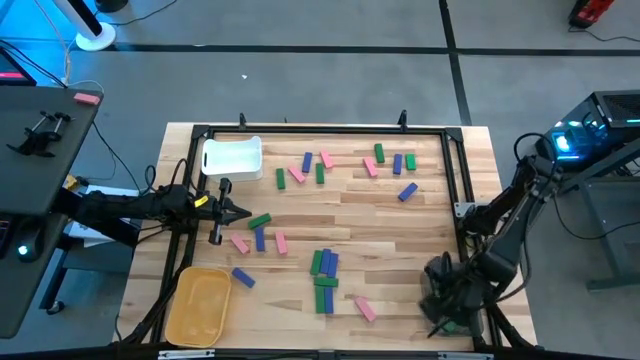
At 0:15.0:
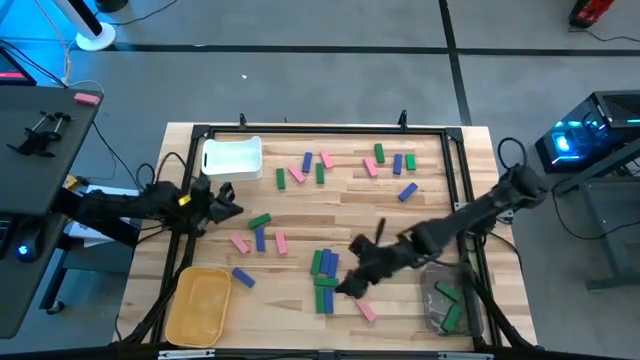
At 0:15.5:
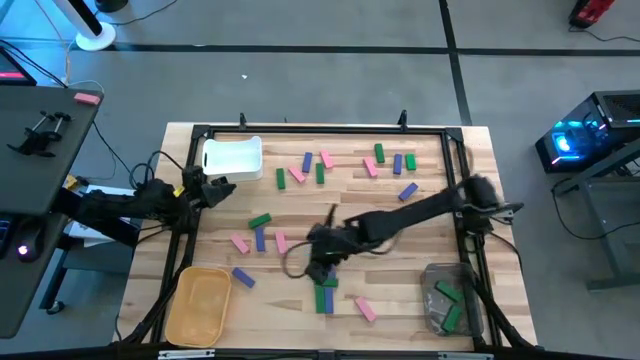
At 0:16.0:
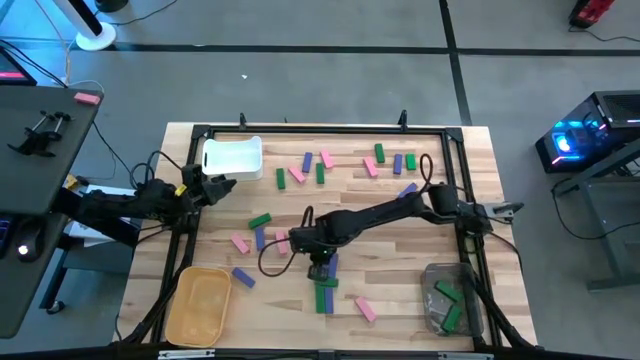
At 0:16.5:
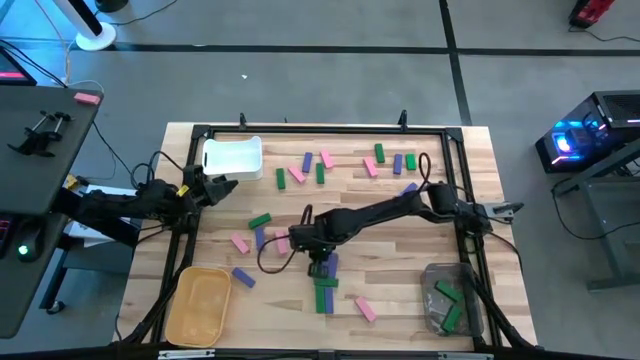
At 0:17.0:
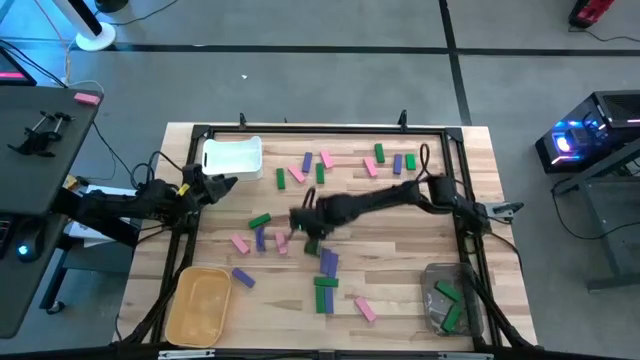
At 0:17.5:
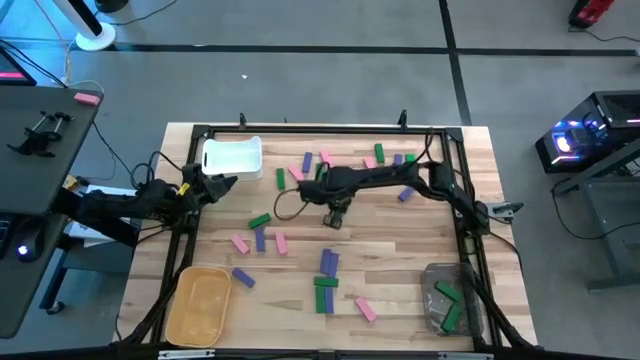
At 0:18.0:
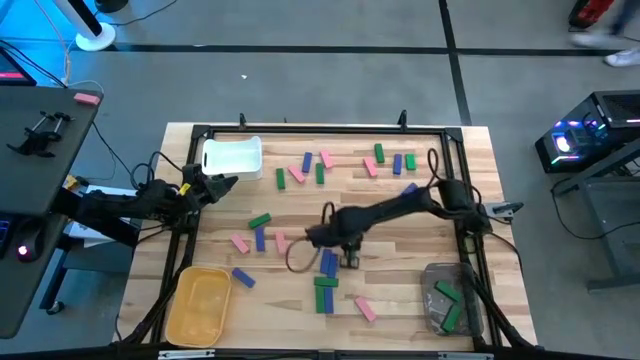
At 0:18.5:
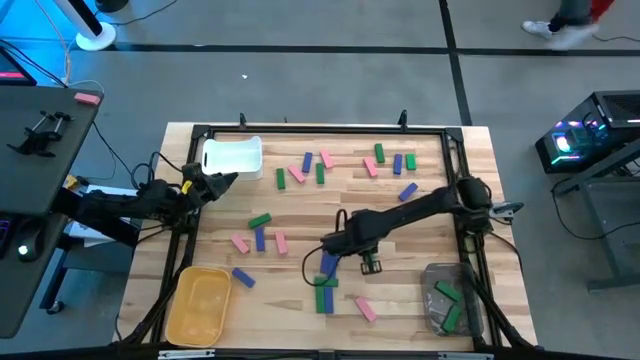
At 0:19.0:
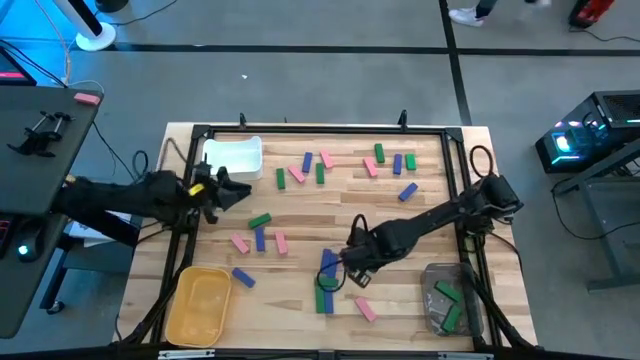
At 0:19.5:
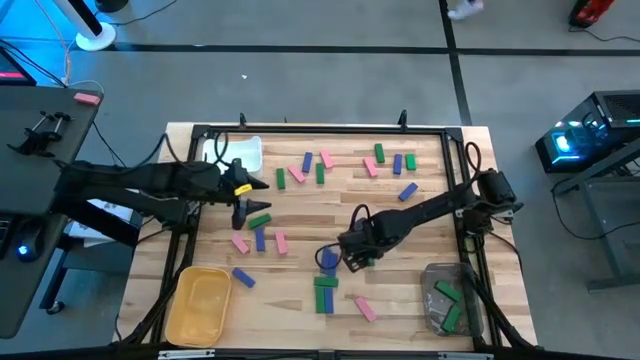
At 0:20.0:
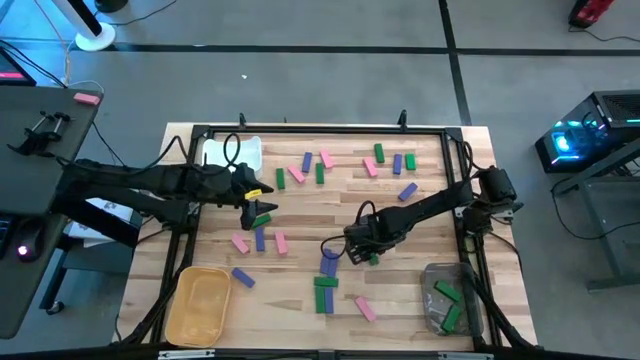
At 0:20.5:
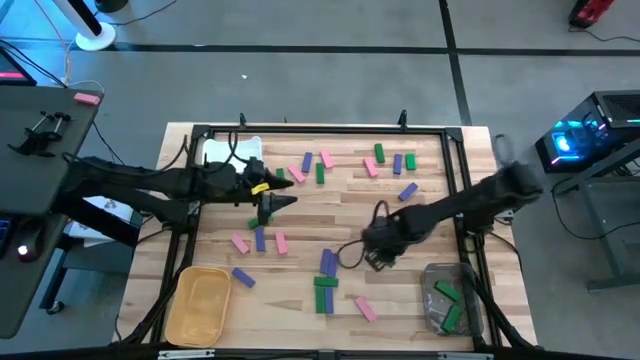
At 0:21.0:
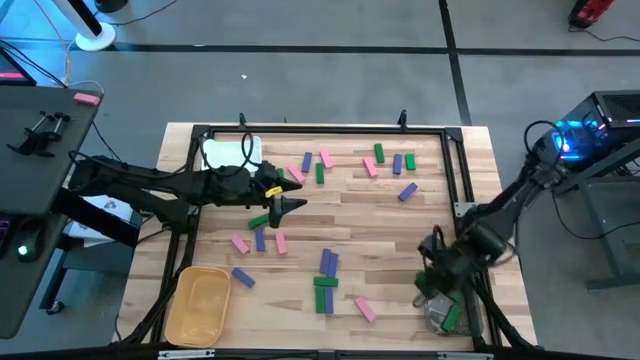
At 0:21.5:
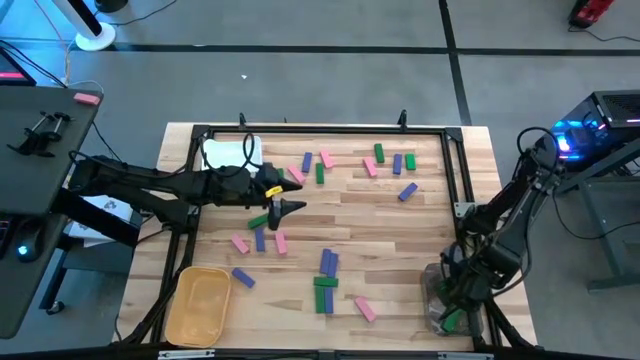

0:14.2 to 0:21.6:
Task: Sort blocks
Put the green block into the black transparent bin

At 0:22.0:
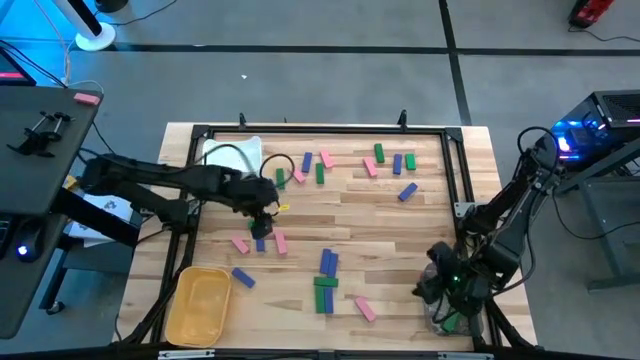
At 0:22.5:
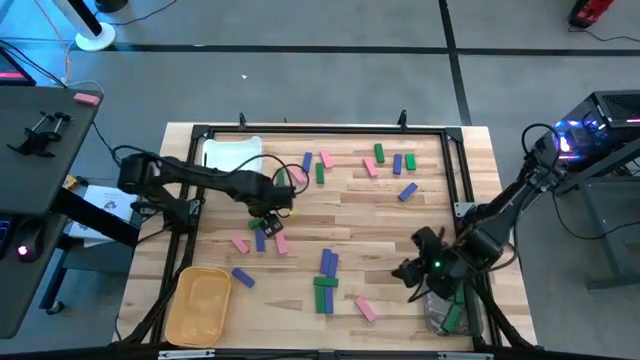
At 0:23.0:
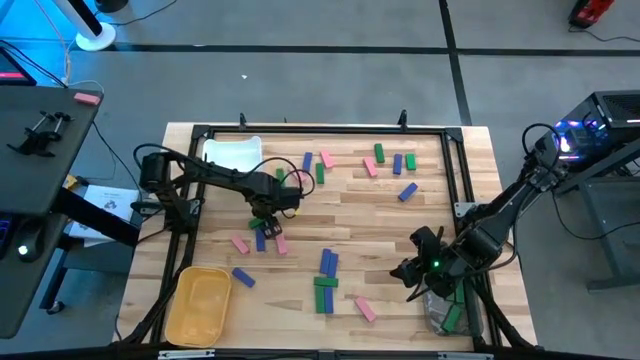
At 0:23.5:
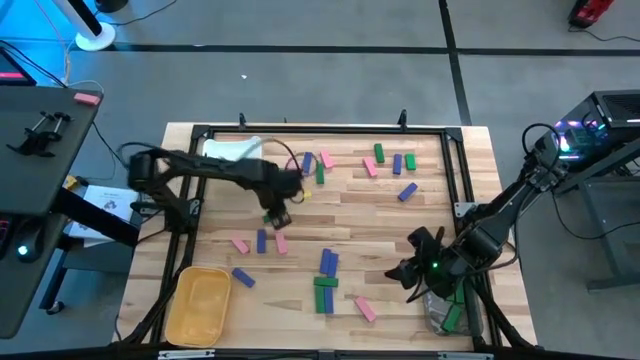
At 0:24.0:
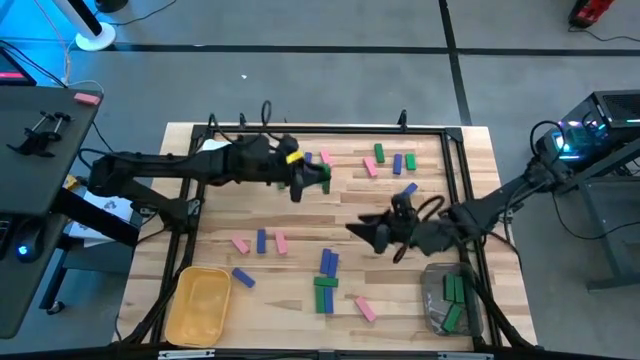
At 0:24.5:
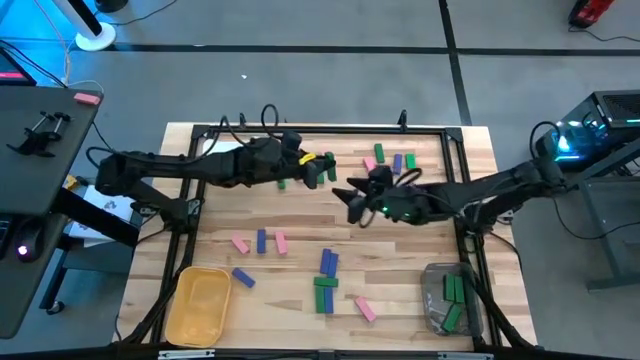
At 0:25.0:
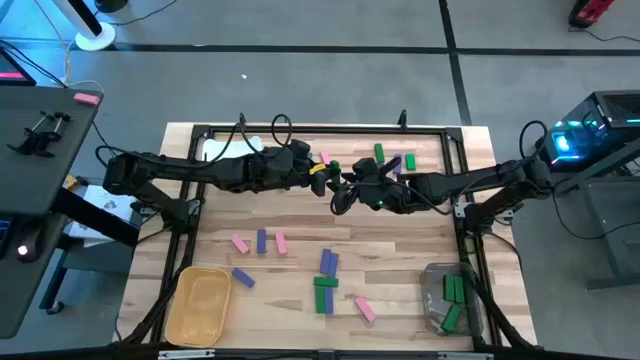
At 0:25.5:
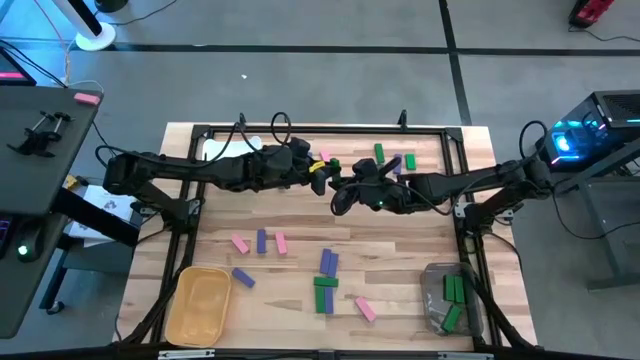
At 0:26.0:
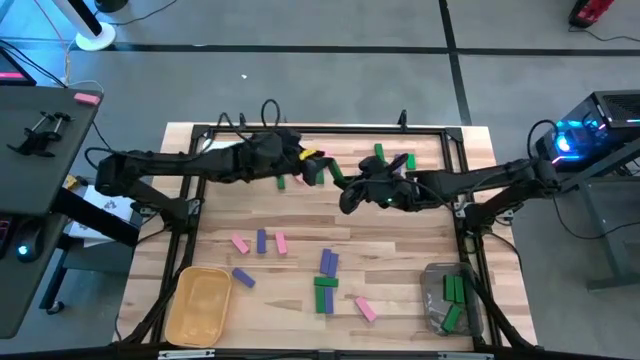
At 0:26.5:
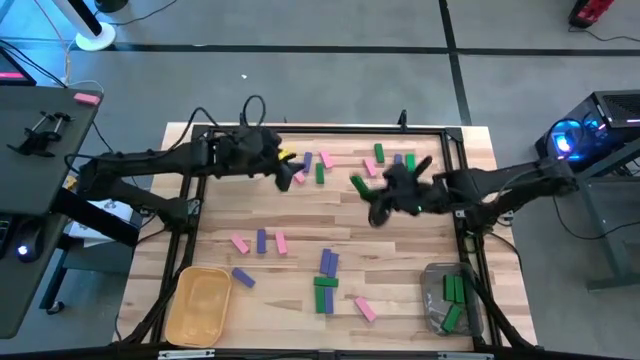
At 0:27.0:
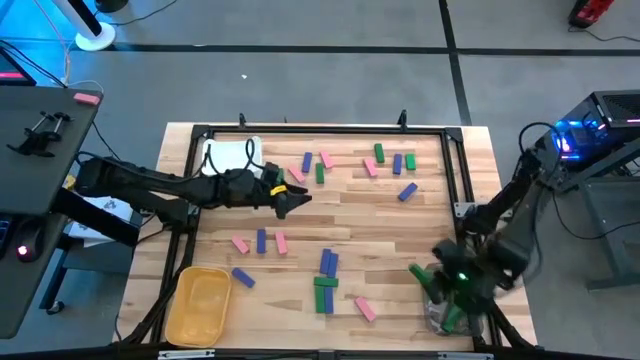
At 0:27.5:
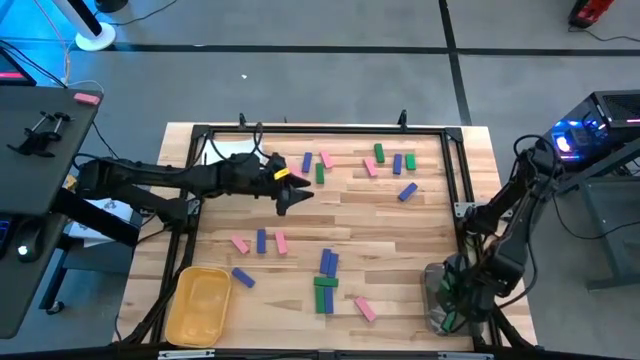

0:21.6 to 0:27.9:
Put the green block into the black transparent bin

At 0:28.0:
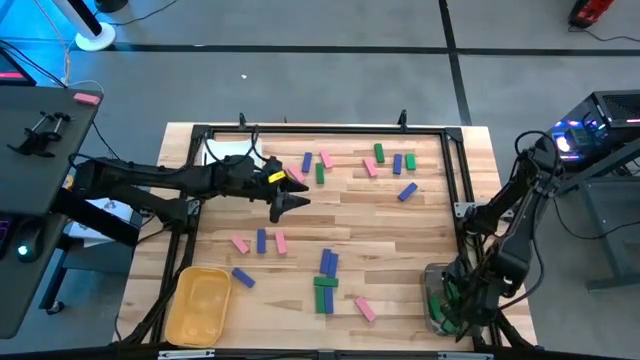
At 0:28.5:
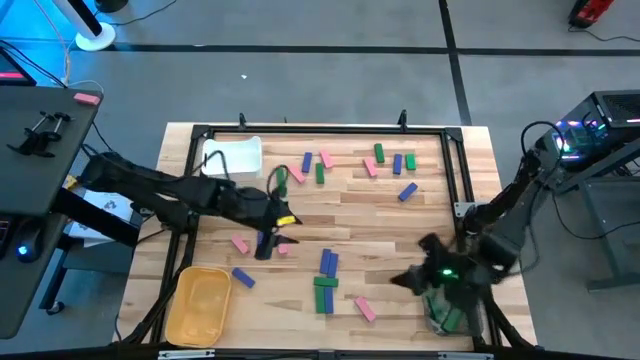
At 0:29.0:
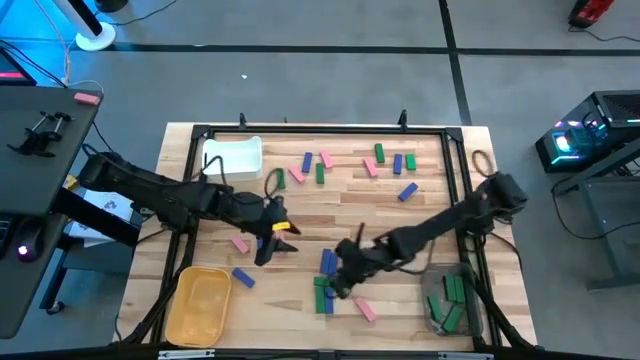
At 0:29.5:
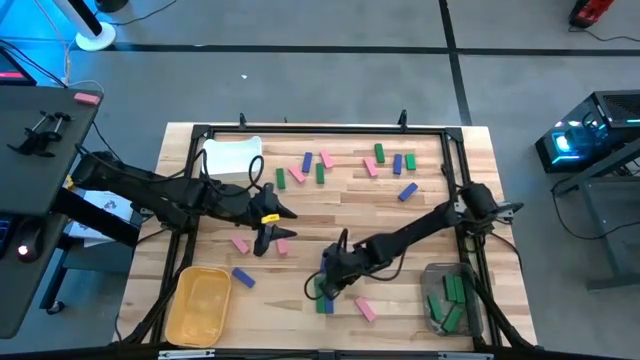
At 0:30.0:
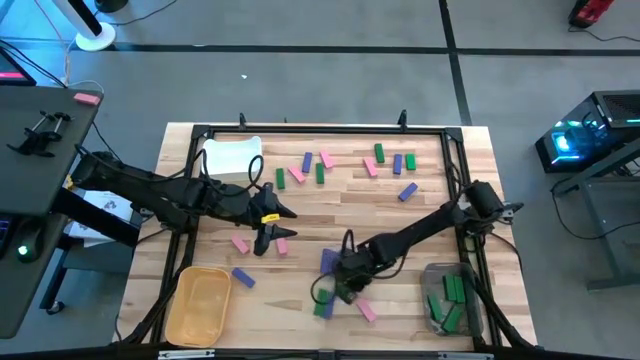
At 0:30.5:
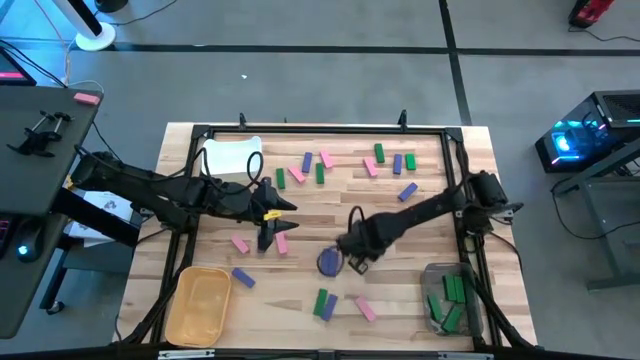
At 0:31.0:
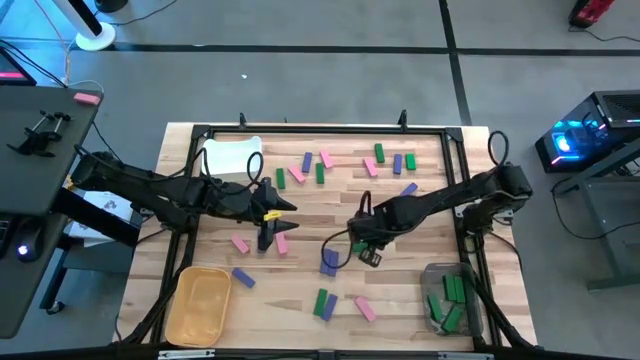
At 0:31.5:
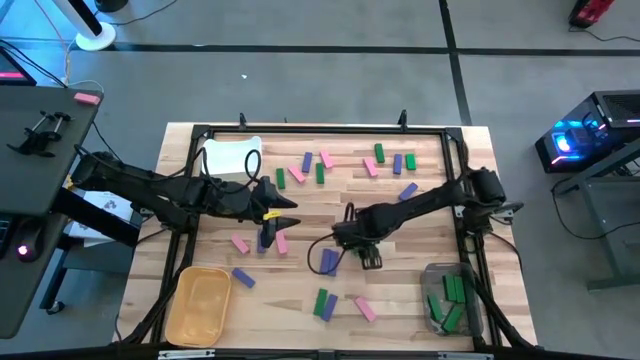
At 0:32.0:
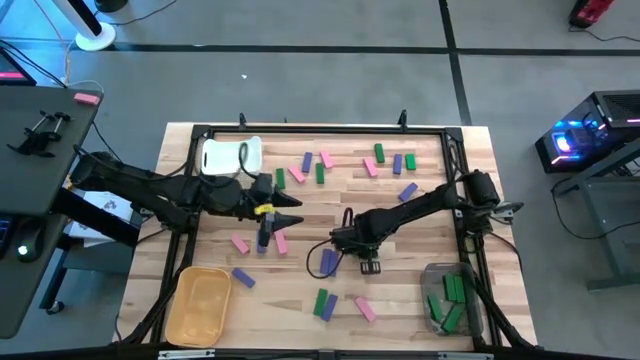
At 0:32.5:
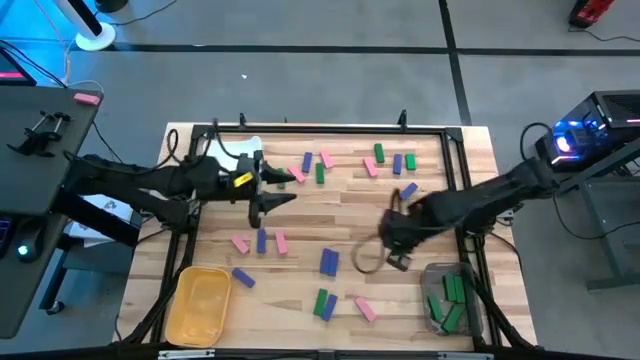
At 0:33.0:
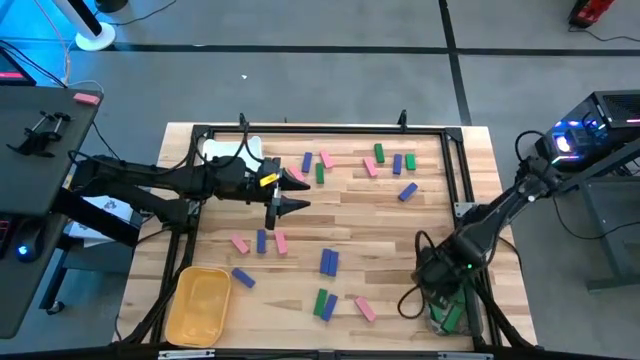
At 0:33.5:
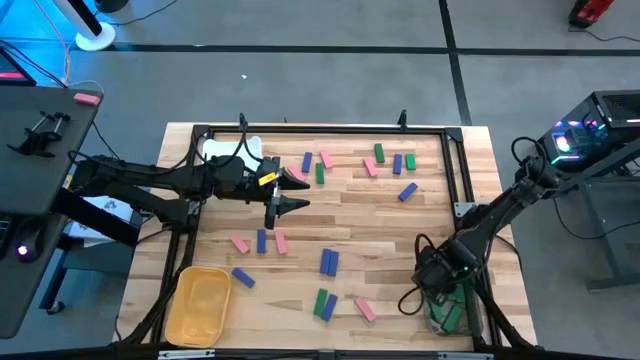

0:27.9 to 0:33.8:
Put the green block into the black transparent bin

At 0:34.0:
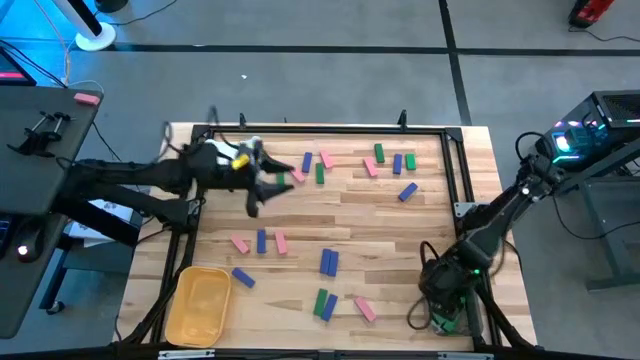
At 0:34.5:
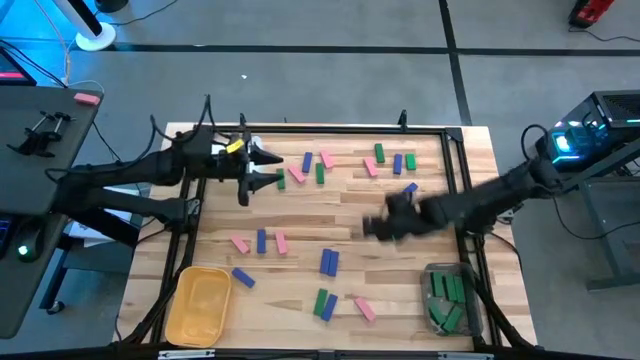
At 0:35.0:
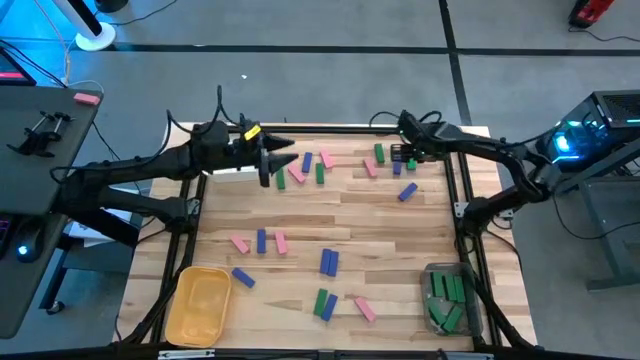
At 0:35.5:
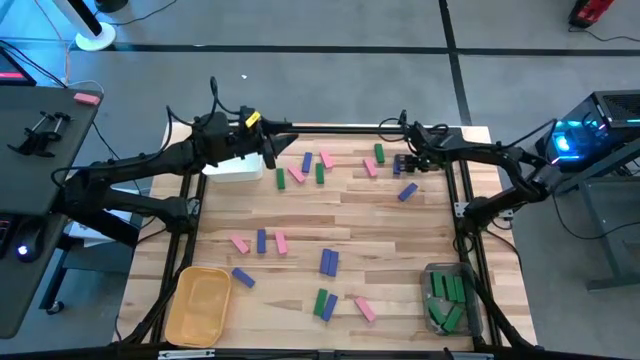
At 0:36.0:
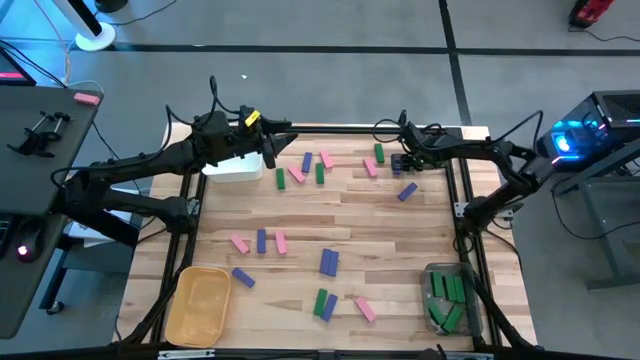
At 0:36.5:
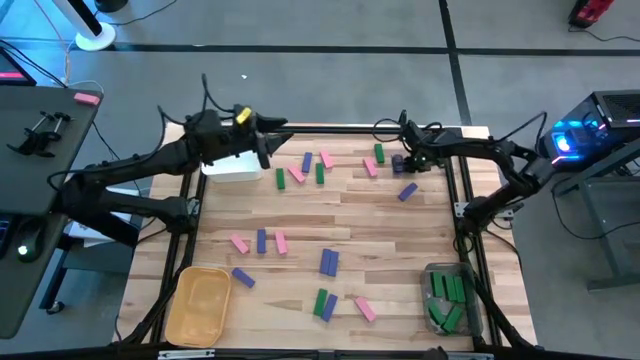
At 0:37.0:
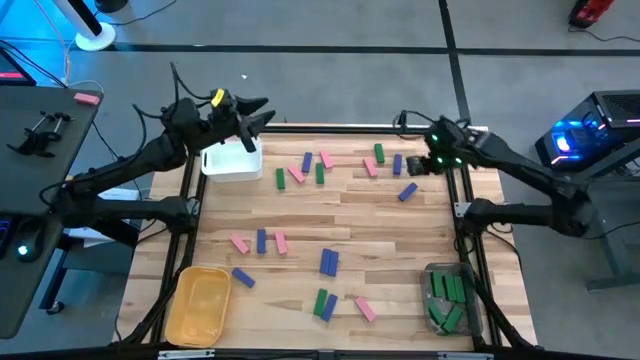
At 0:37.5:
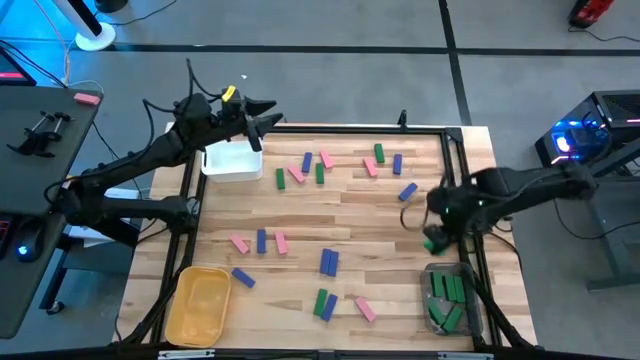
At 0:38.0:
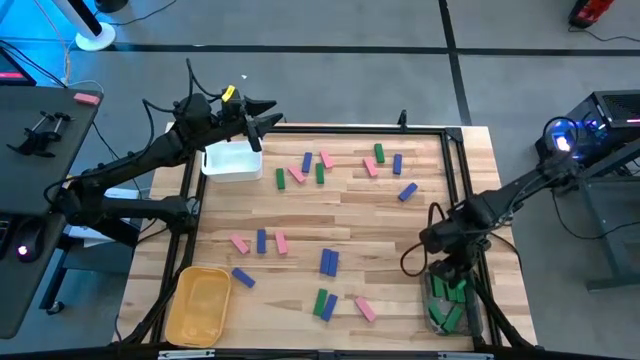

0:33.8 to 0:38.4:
Put the green block into the black transparent bin
